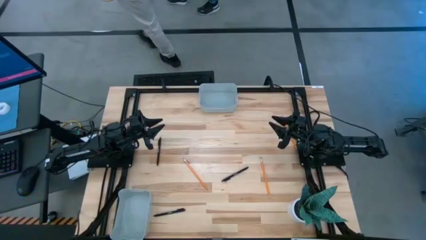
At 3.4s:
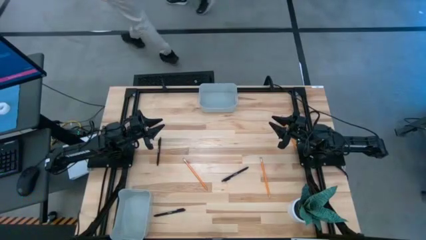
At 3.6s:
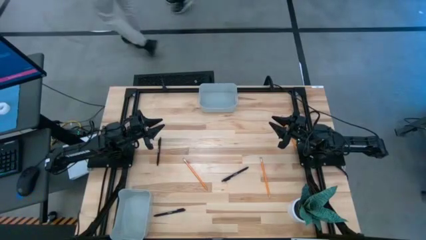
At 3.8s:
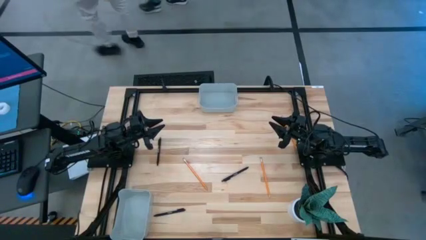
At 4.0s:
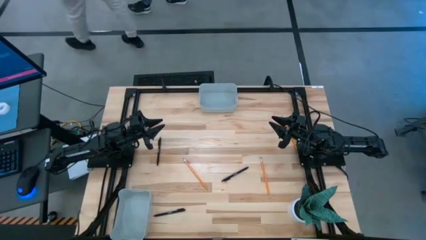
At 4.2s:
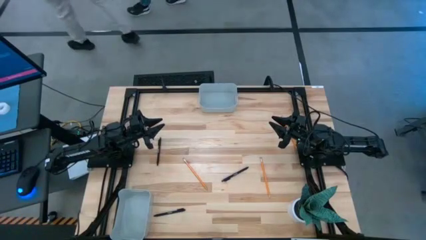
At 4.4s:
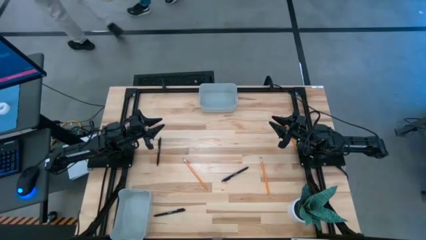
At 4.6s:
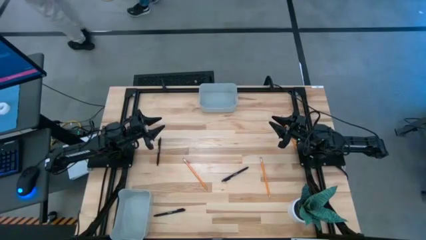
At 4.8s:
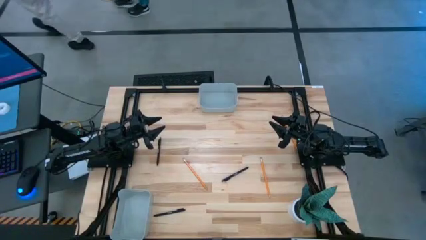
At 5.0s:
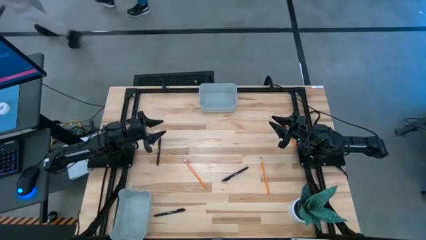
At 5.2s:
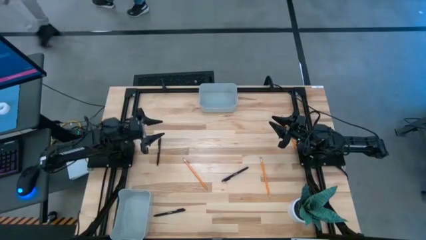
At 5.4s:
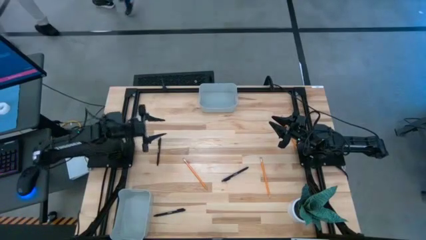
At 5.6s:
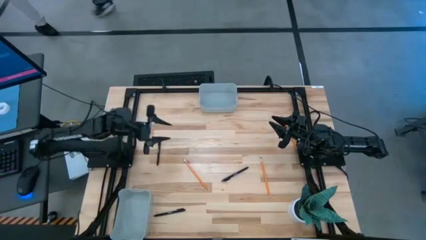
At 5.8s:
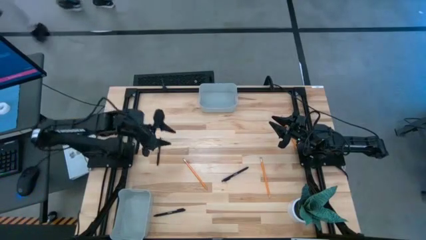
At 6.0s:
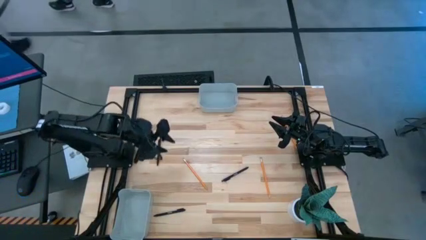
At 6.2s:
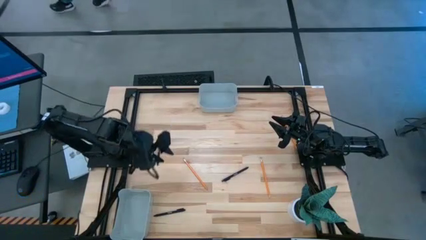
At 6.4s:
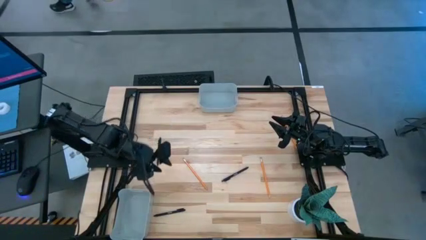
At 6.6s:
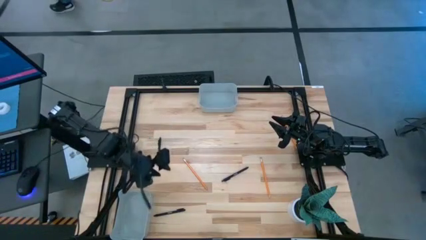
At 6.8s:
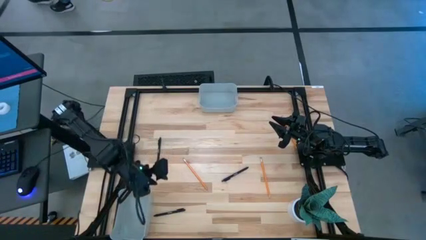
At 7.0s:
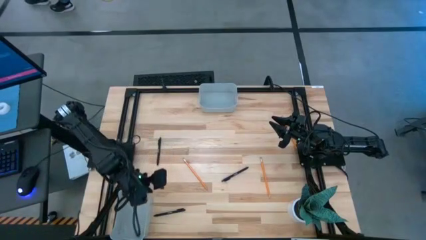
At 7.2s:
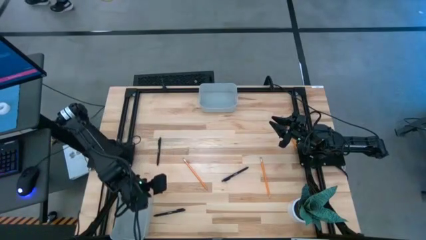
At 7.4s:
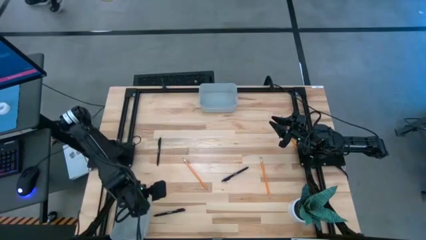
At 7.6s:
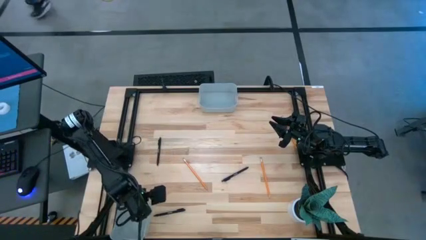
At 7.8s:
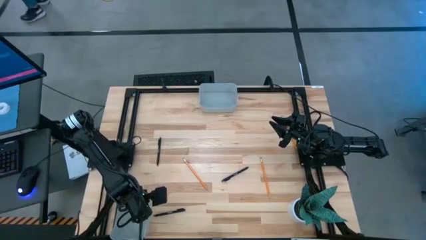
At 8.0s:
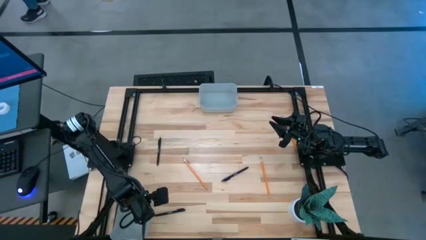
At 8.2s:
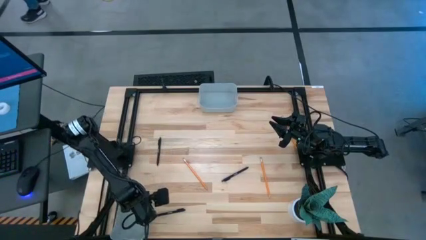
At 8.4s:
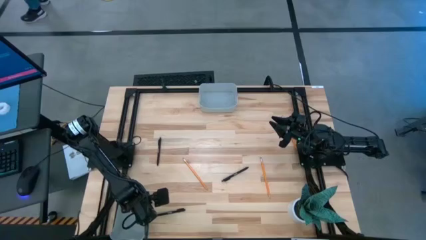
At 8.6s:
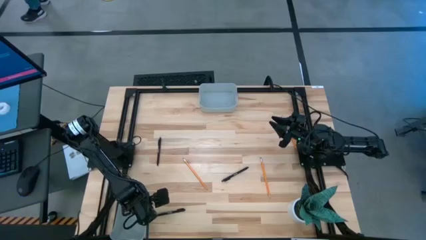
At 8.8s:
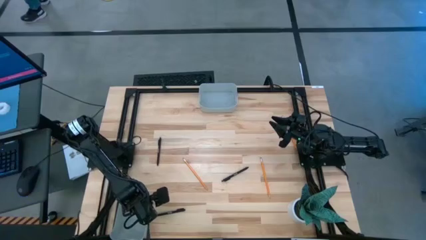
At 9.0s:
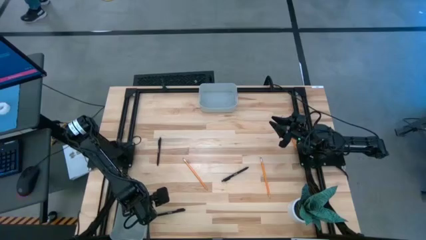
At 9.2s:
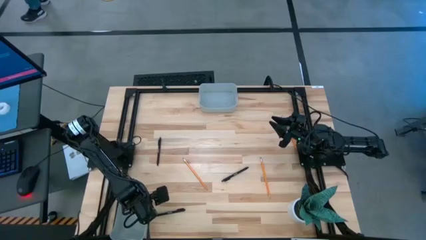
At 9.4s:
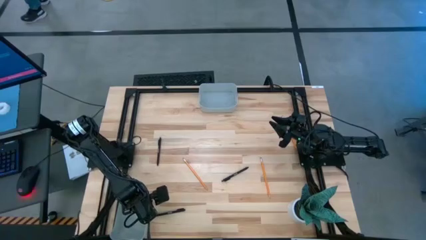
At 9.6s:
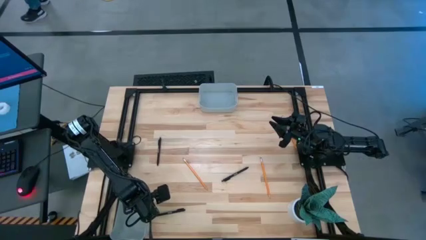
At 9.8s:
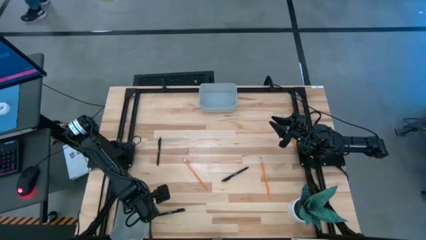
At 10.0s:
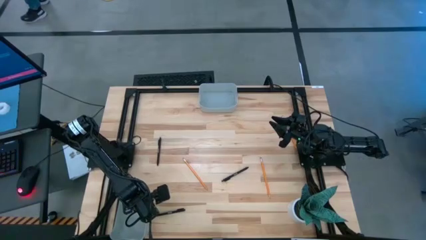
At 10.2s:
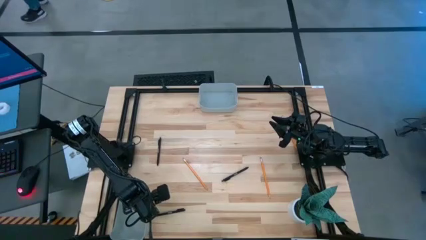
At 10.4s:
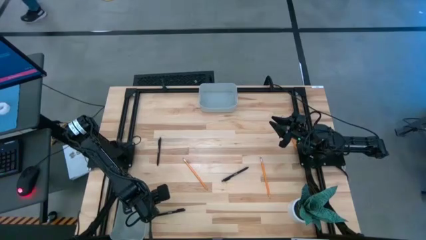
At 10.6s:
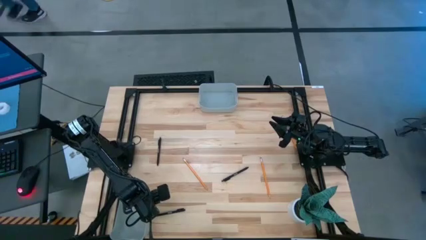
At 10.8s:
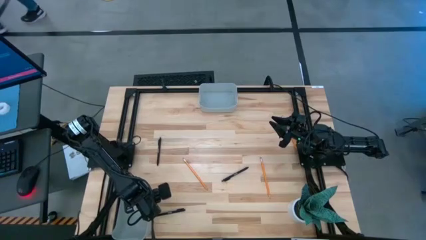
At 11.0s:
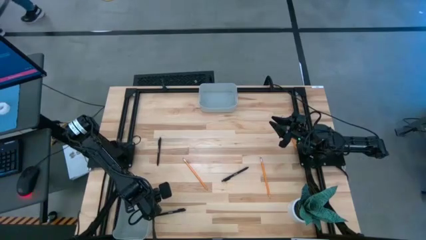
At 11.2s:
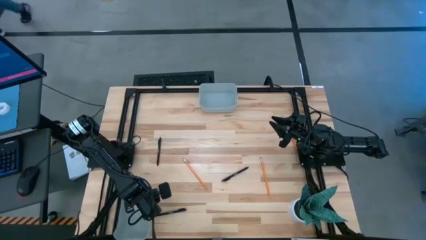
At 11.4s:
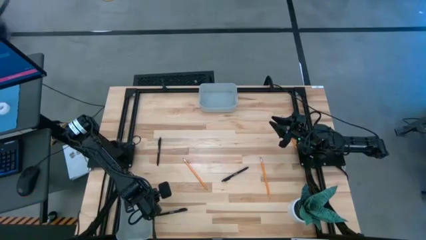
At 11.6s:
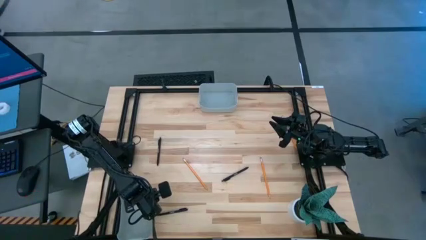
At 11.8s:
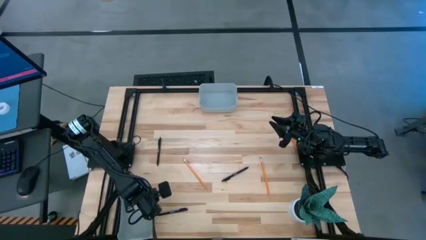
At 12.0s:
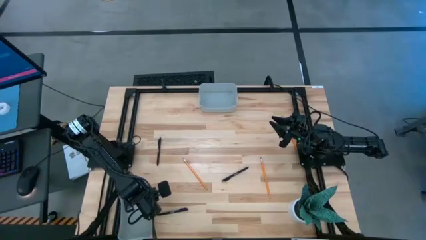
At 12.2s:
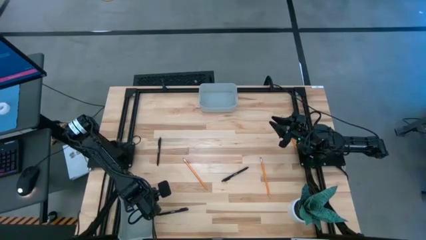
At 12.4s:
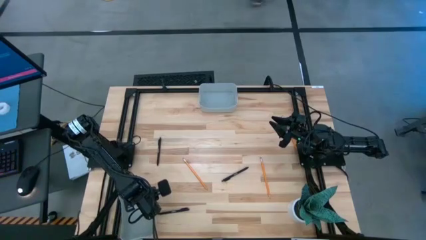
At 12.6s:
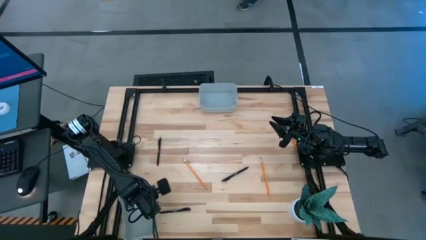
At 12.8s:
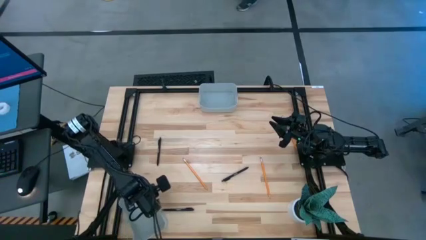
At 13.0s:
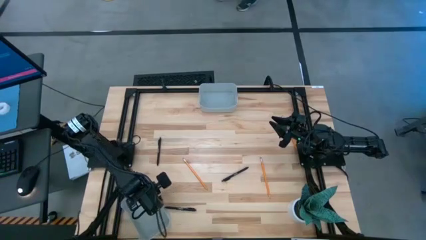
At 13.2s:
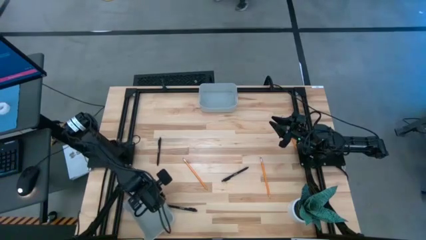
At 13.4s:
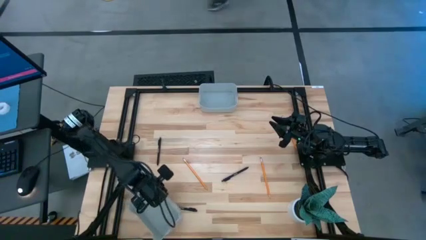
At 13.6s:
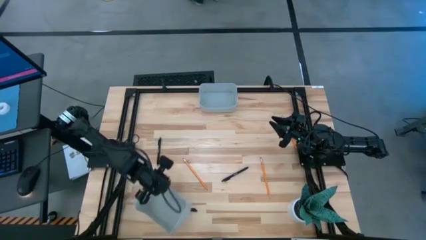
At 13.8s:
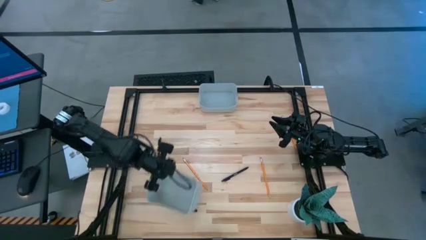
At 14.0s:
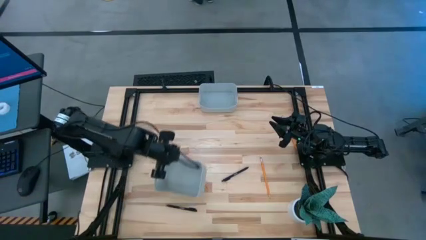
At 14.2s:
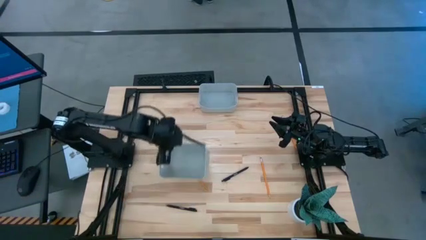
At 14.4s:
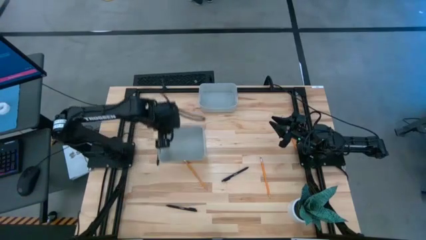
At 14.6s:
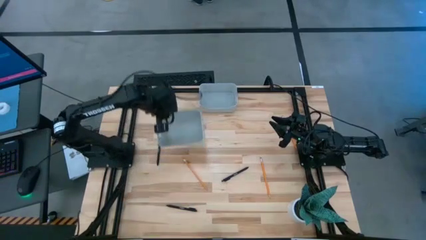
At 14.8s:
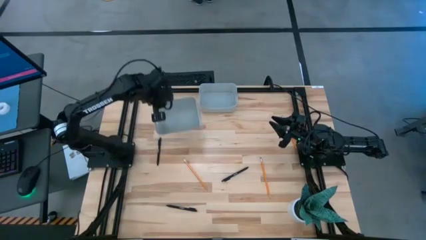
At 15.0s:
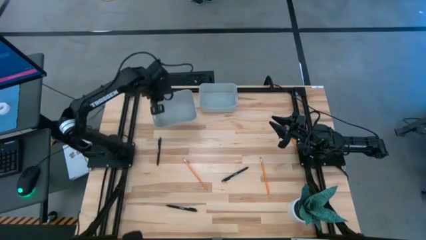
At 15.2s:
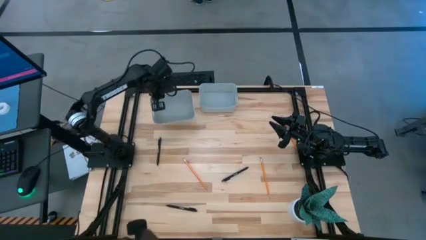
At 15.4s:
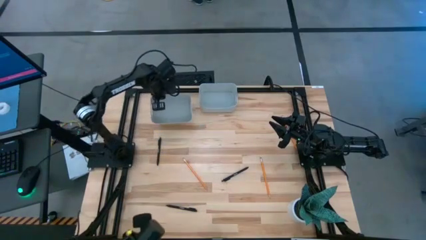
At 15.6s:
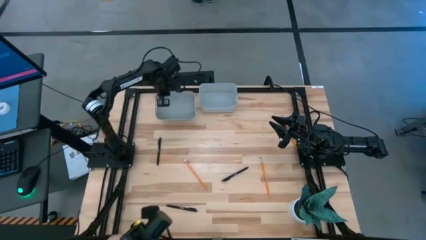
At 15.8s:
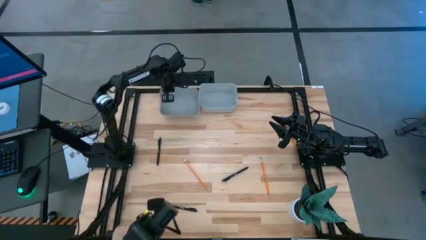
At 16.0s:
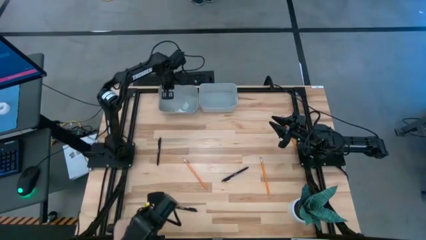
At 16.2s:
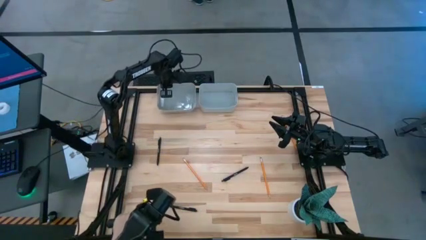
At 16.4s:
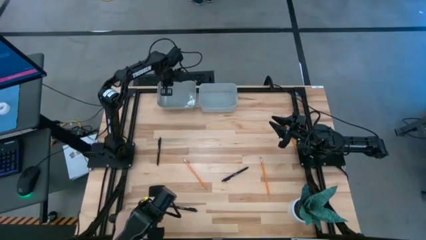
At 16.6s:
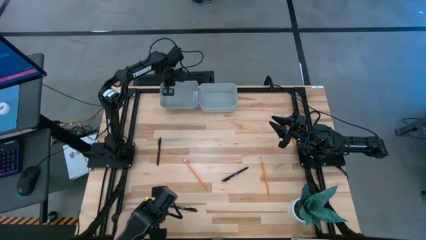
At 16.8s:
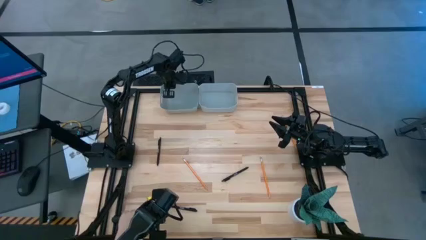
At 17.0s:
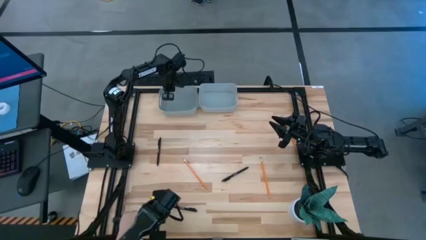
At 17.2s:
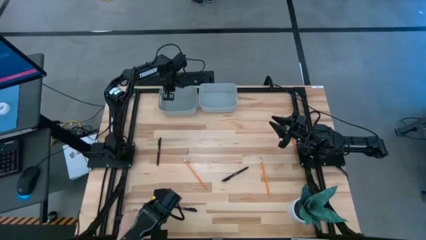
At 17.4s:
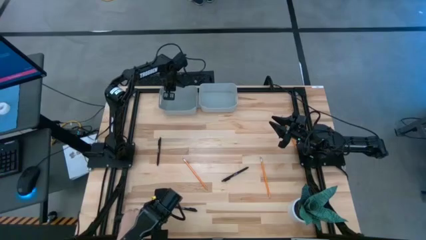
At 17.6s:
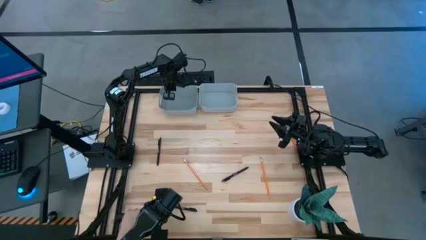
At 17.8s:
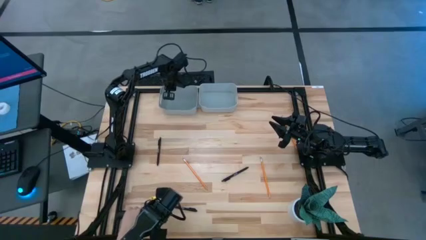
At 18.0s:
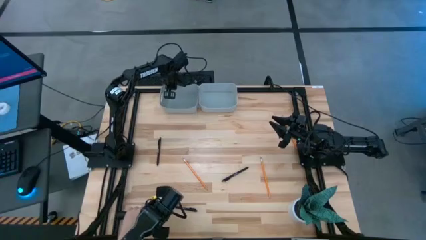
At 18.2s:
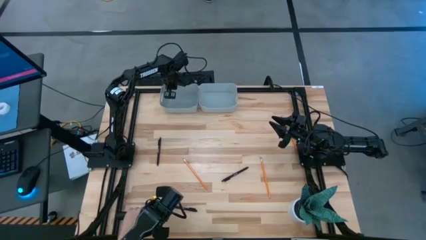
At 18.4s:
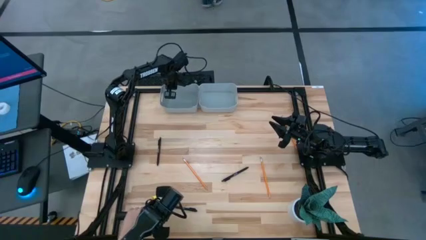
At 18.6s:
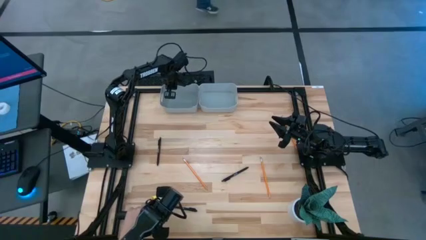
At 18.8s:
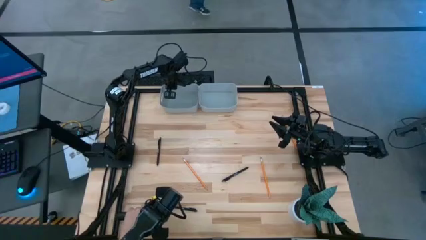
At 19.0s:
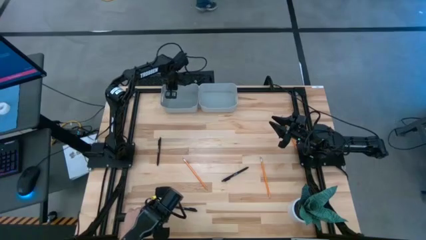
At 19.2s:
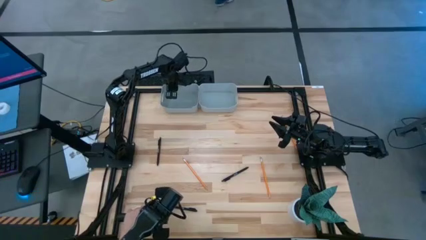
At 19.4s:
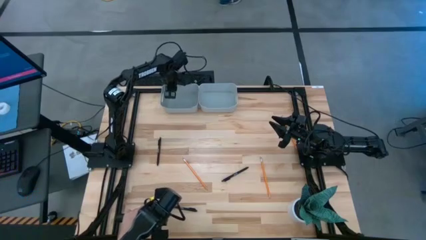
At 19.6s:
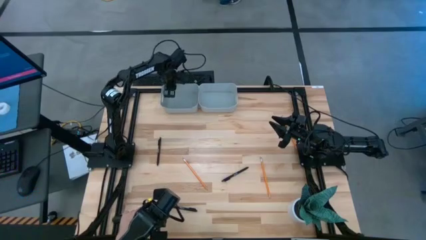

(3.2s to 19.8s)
Task: Sort pens & pencils
Move the bottom gray bin to the top left of the table
